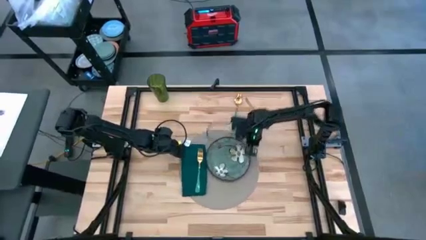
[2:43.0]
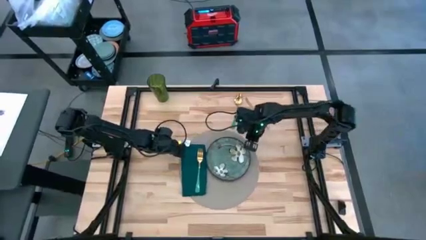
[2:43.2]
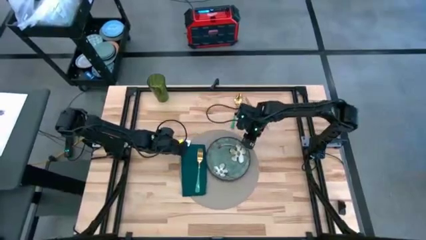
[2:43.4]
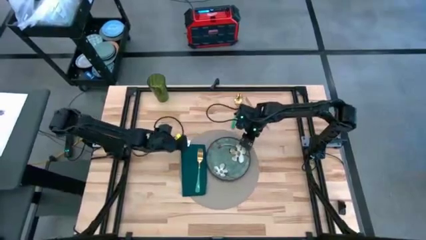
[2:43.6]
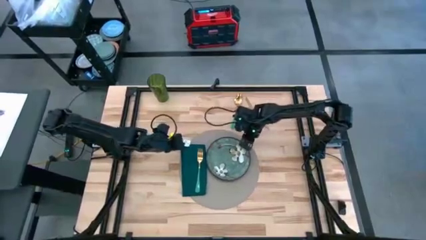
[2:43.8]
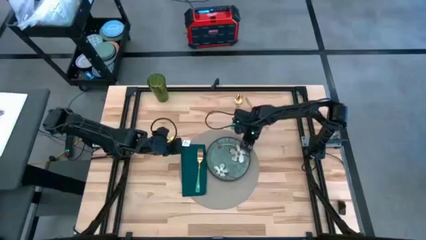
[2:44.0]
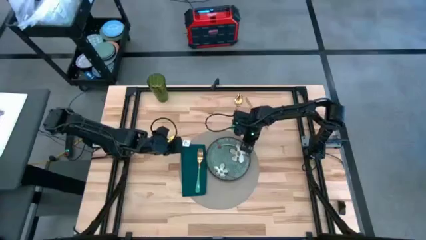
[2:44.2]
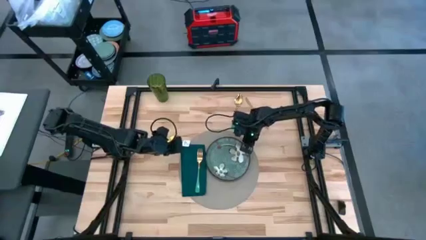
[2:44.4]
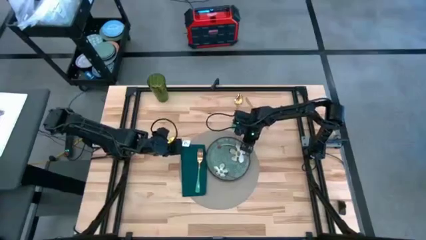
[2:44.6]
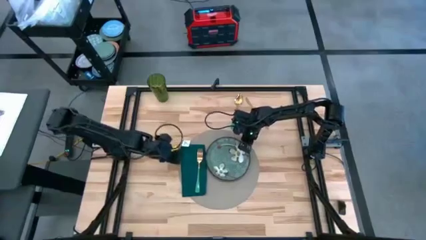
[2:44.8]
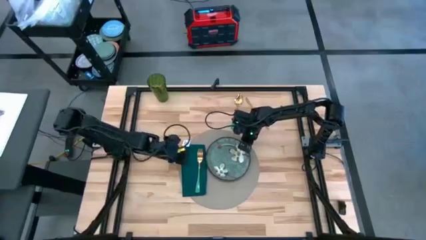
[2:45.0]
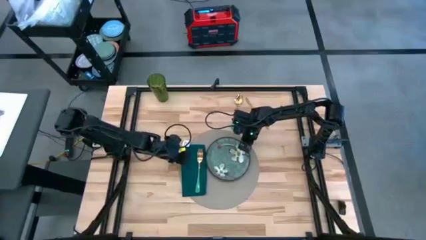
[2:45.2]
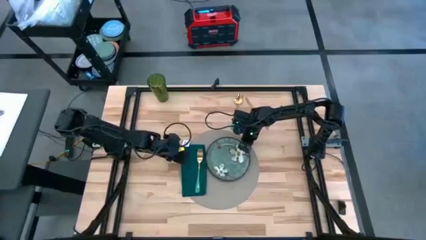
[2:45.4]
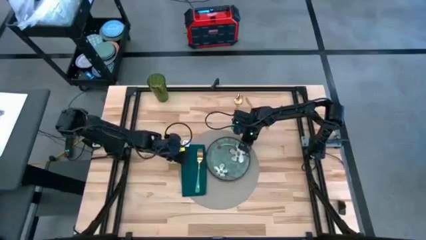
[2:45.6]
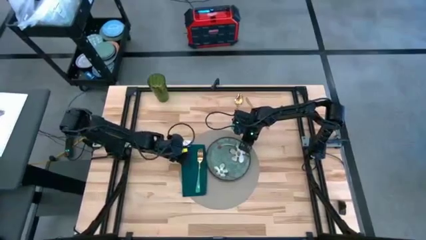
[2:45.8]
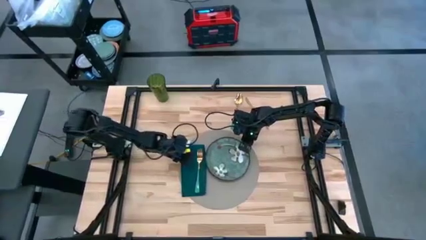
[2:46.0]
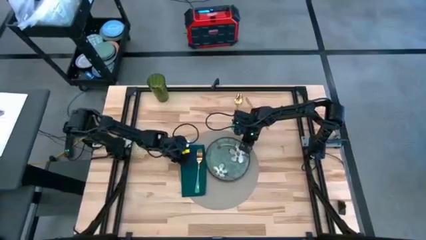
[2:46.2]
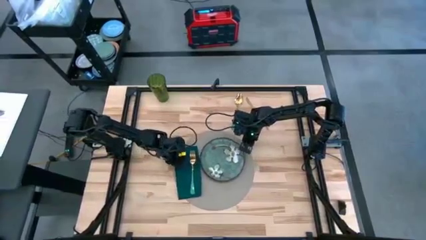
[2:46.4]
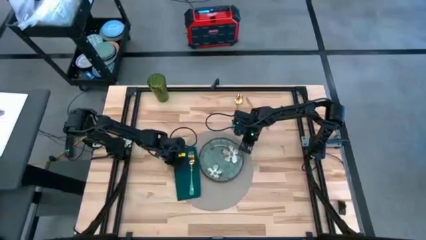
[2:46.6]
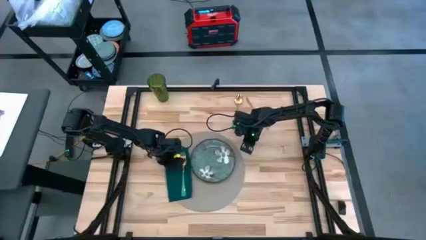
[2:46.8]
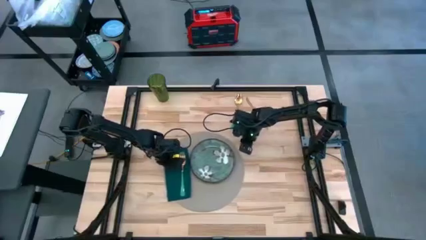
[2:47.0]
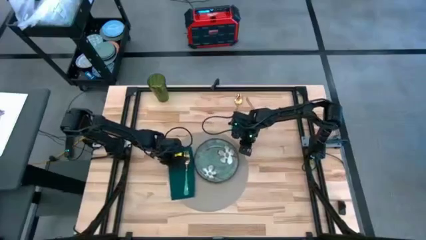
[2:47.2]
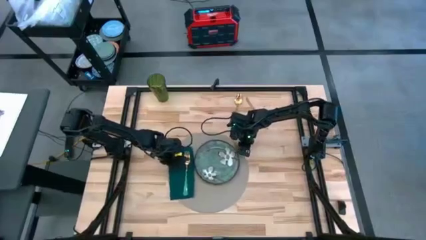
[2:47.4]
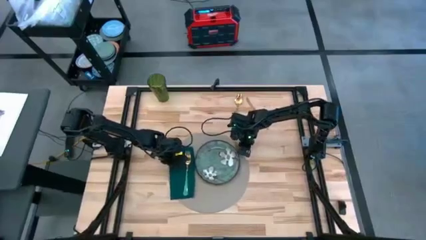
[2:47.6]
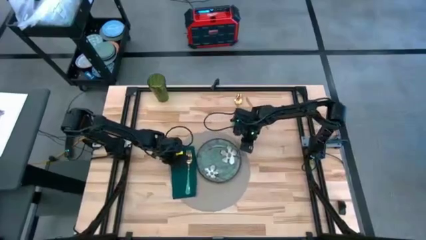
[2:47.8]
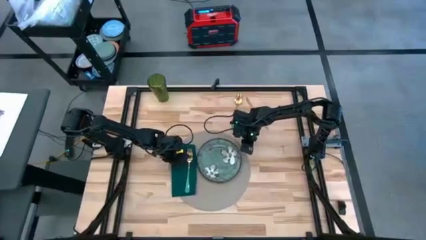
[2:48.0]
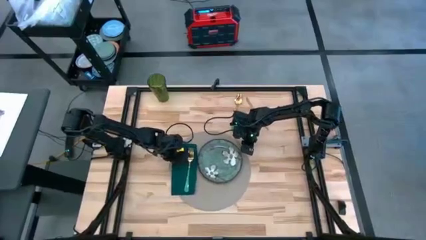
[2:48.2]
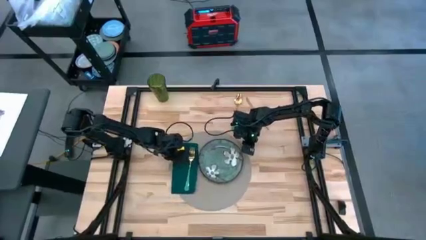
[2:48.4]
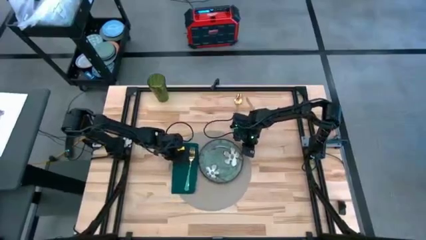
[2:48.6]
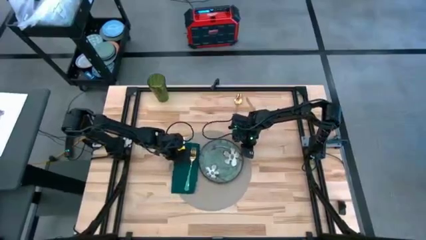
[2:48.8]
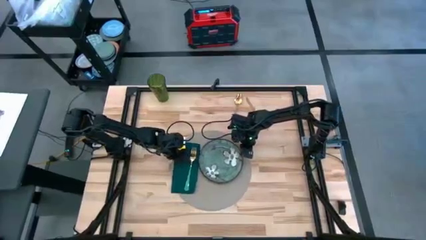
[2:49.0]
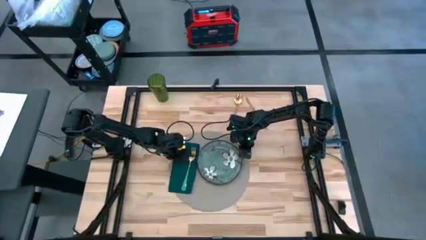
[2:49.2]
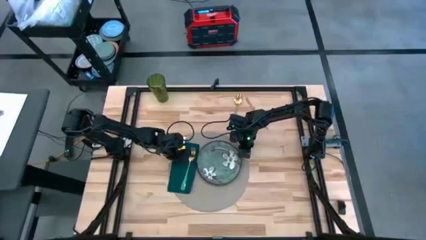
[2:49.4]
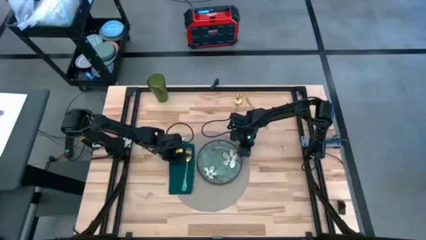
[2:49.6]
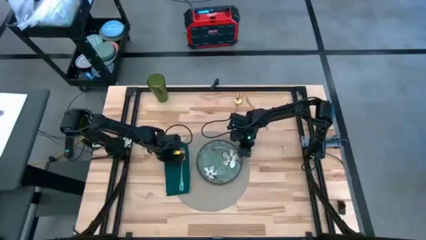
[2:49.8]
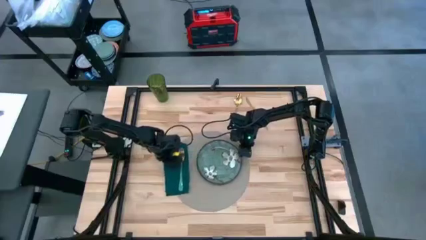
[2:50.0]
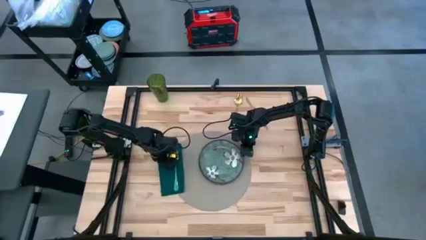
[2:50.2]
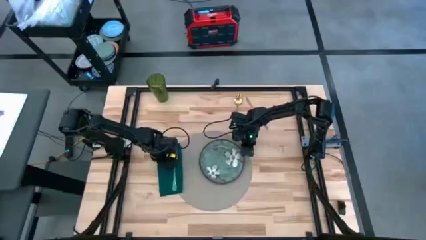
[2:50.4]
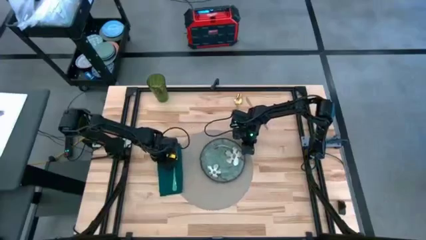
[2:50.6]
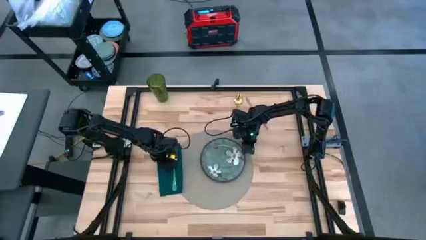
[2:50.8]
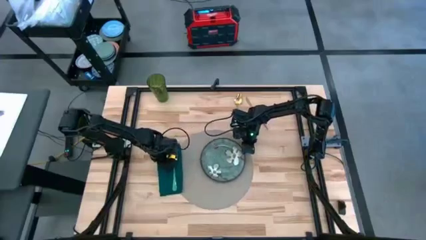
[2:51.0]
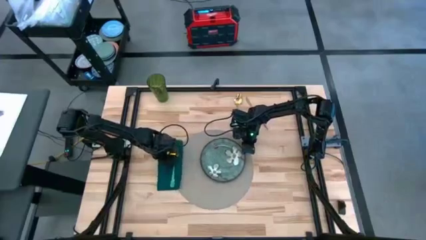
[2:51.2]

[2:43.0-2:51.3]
Task: Set table place
Move the green napkin to the middle left of the table

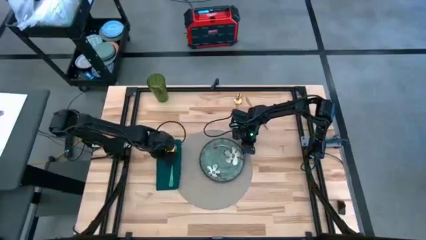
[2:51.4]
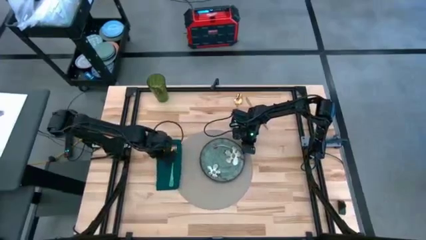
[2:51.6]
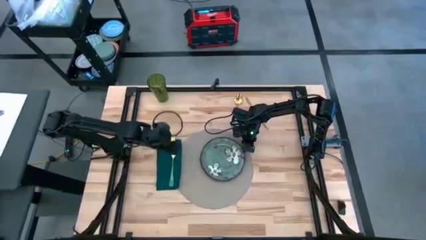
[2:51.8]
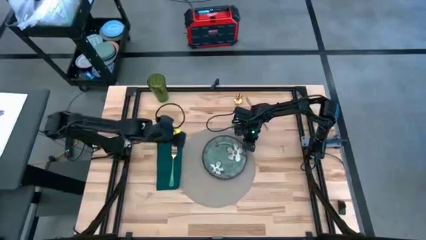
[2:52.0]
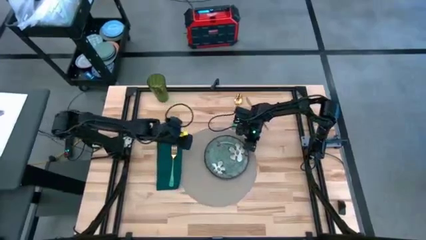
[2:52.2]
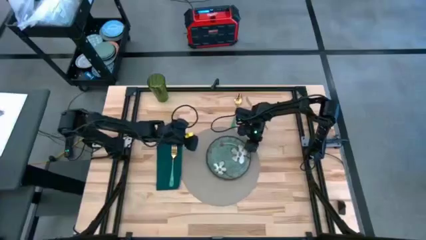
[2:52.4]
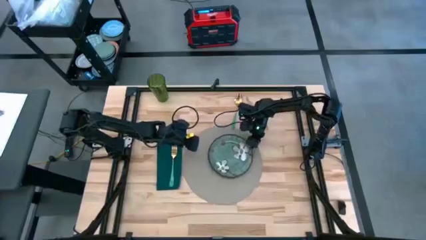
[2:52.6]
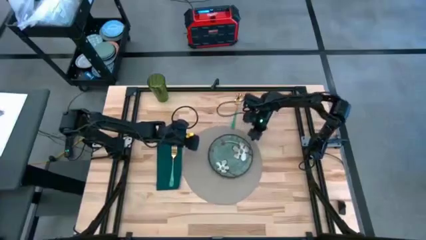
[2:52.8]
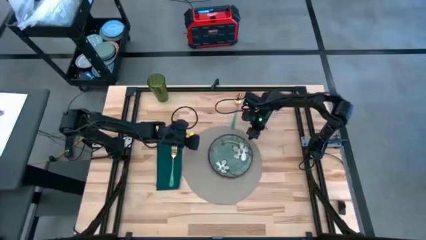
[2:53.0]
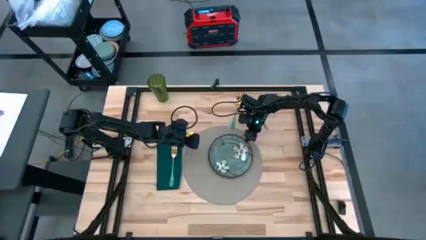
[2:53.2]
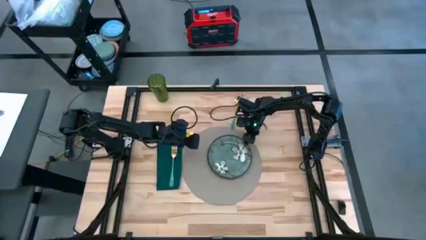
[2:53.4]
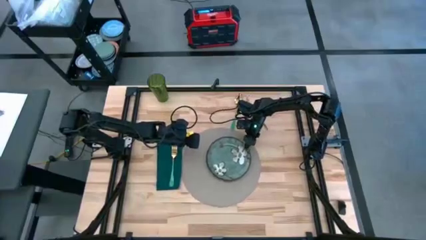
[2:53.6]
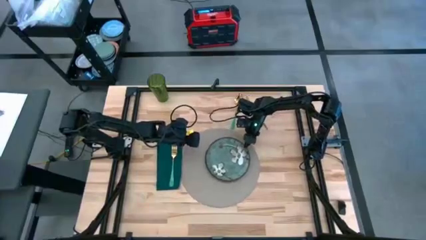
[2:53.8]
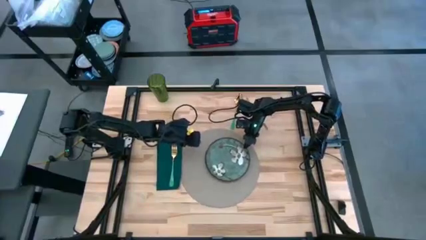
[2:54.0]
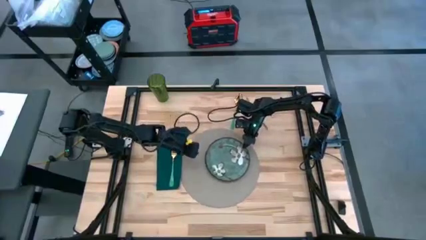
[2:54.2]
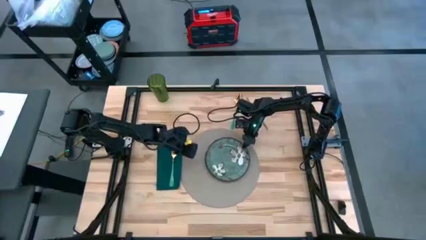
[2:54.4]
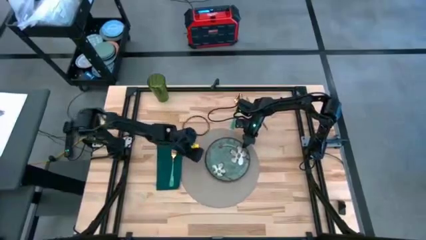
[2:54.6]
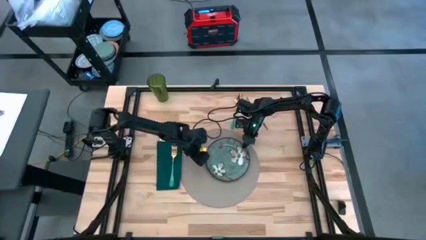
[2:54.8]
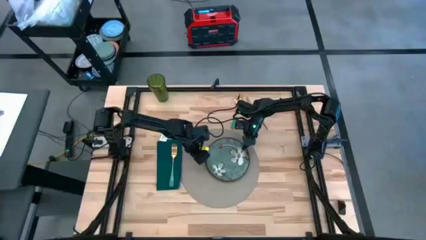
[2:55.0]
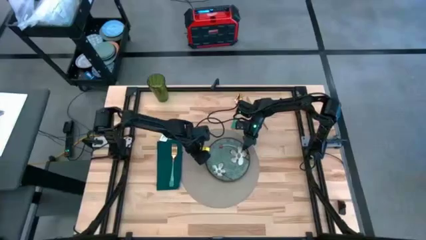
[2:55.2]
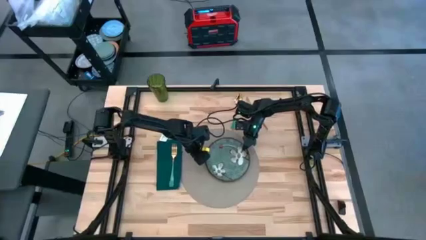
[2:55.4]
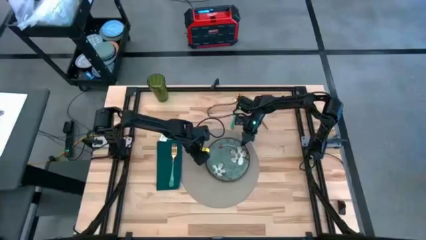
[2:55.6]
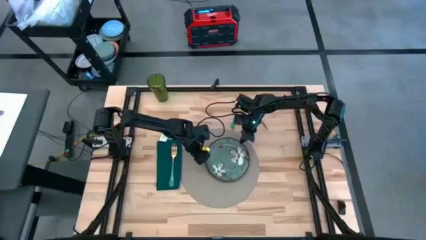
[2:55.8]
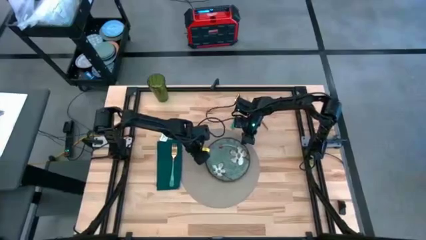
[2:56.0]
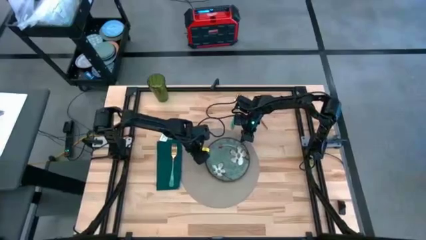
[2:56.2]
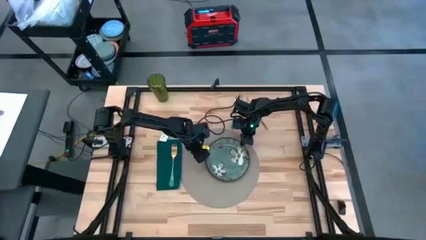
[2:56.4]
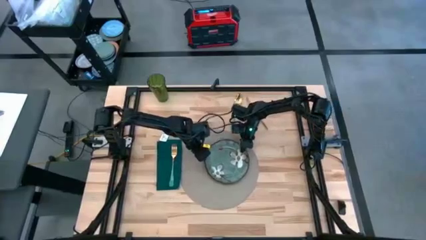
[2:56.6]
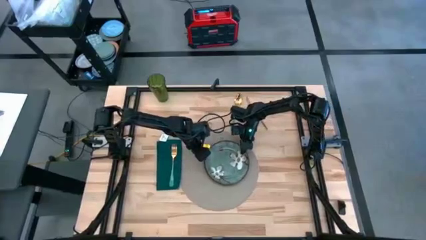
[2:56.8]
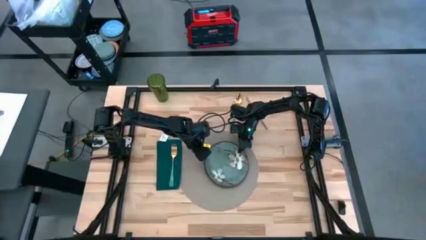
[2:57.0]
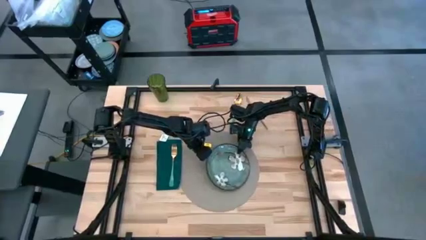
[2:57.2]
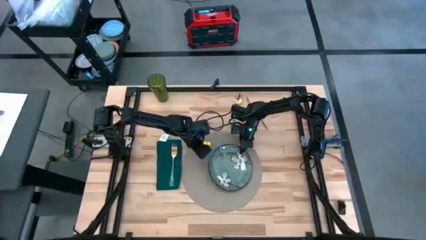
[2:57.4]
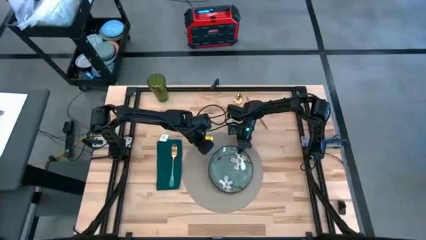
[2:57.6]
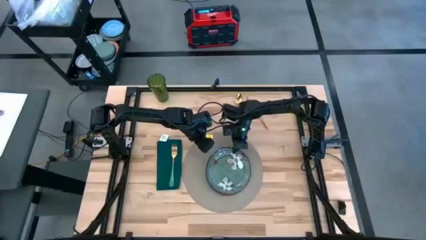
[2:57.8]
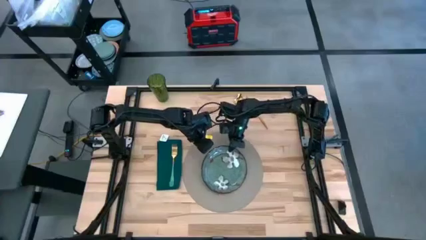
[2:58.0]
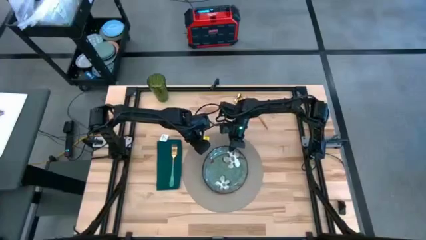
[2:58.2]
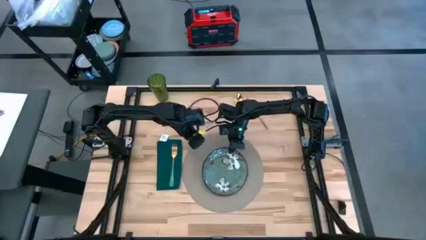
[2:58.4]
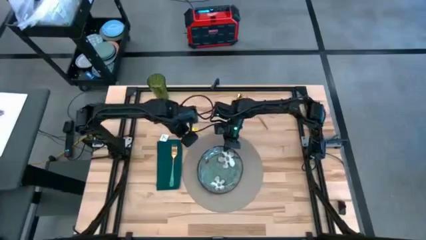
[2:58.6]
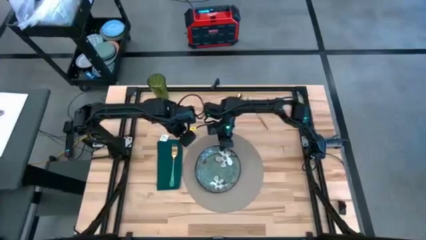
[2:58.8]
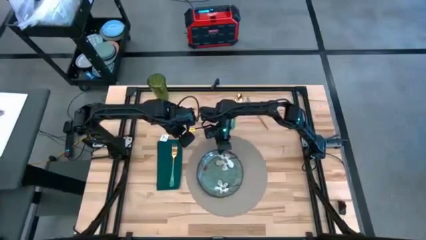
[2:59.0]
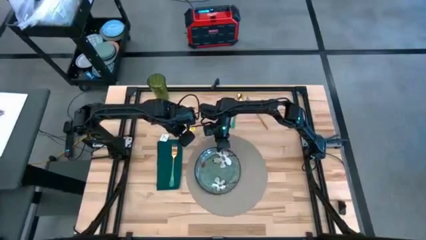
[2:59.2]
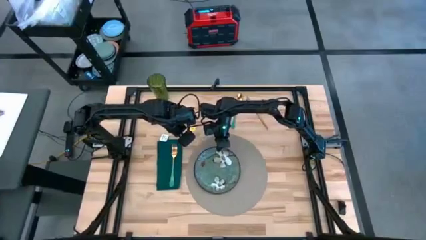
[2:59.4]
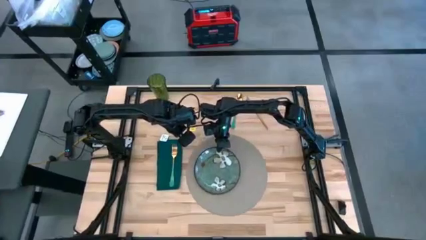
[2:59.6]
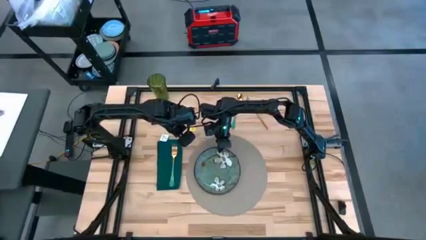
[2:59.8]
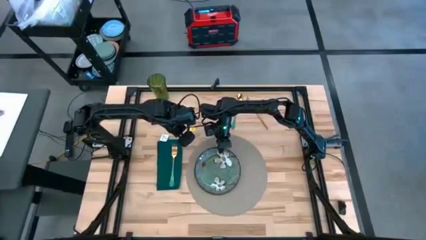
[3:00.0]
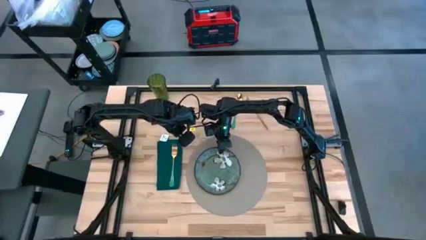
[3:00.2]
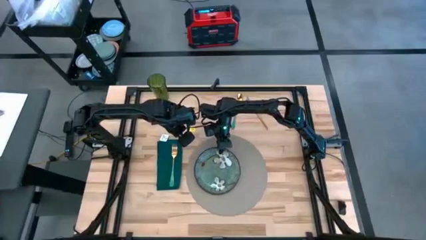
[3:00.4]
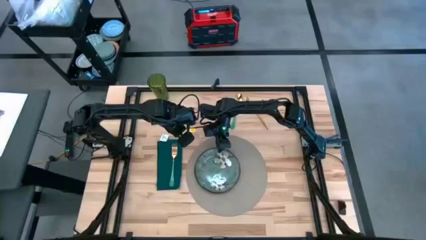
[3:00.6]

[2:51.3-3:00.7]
Adjust the green plate on the gray table mat

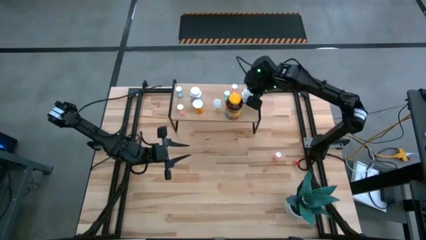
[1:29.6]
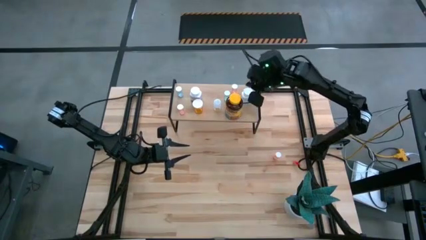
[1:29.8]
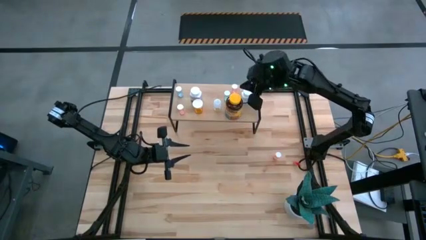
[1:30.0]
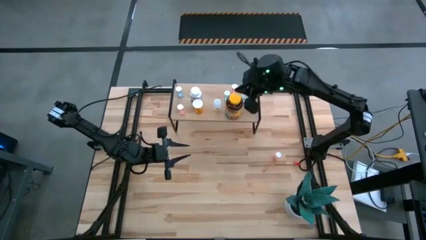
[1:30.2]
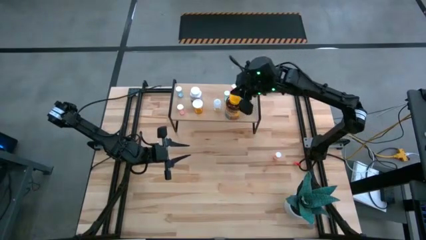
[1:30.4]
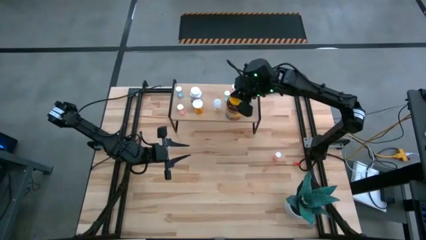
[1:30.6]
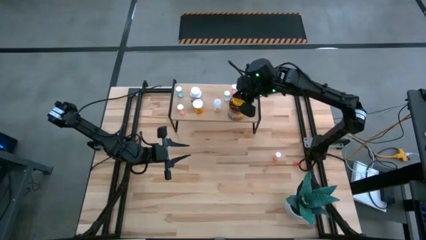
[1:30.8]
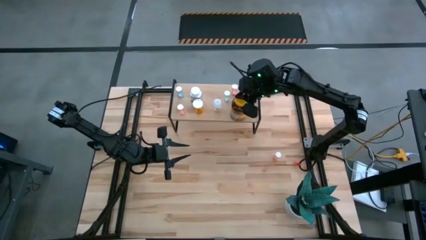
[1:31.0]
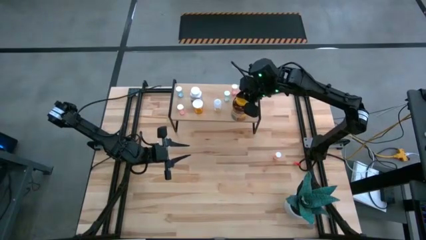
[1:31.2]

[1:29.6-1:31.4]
Task: Pick and place medicine bottles onto shelf by color
Adjust the yellow pill bottle on the shelf
